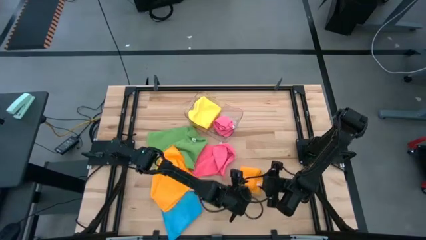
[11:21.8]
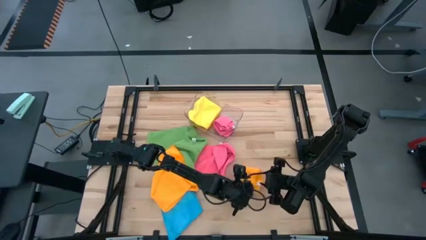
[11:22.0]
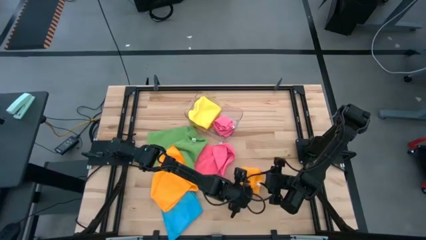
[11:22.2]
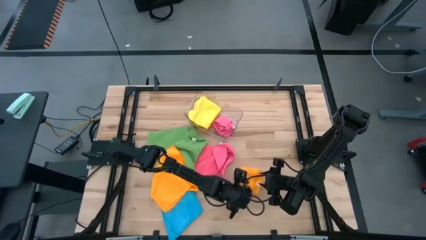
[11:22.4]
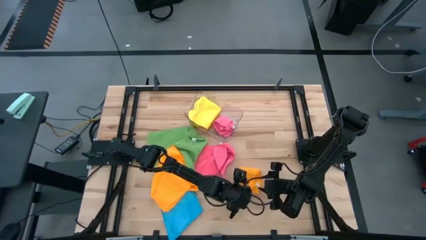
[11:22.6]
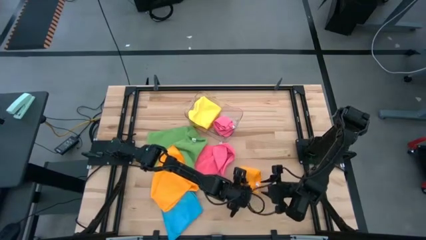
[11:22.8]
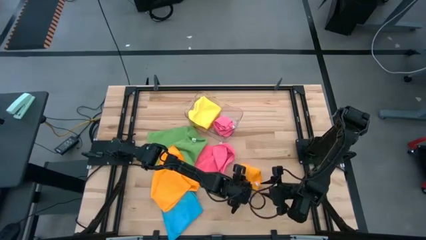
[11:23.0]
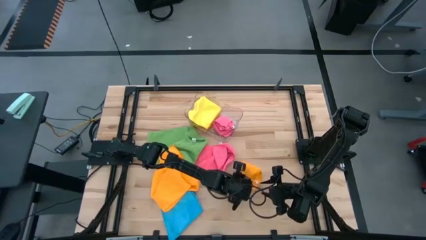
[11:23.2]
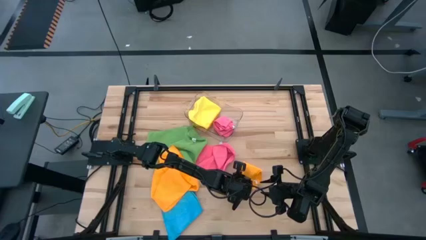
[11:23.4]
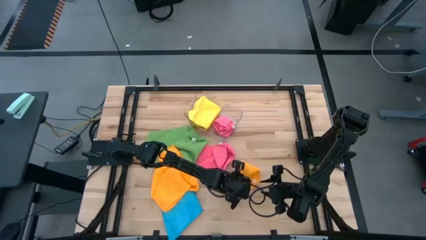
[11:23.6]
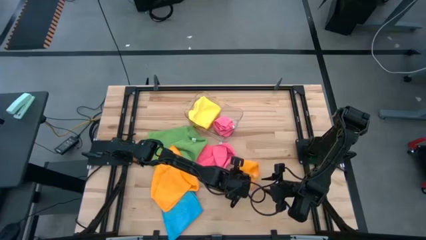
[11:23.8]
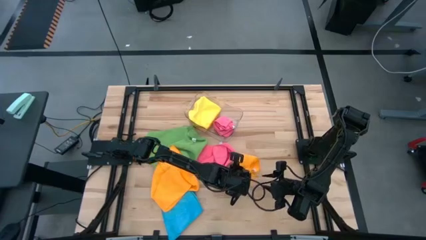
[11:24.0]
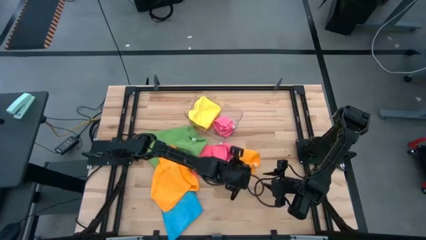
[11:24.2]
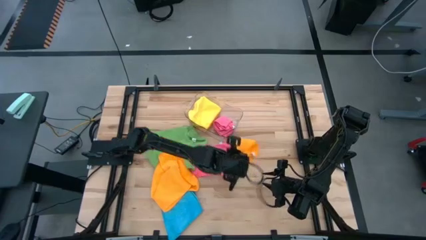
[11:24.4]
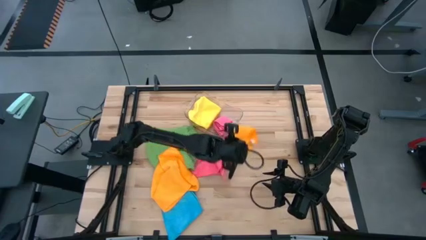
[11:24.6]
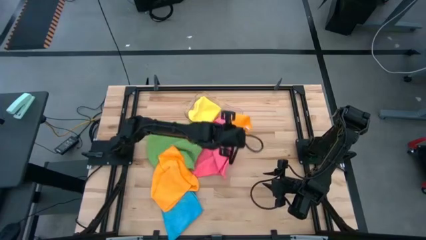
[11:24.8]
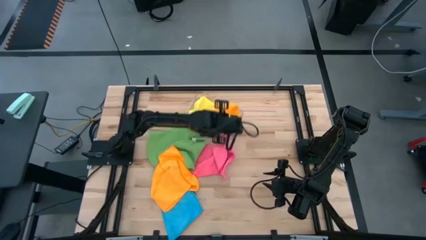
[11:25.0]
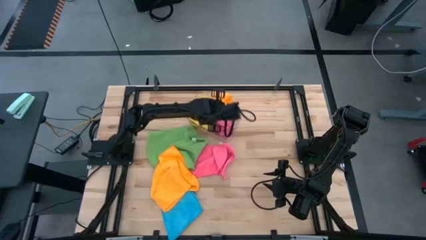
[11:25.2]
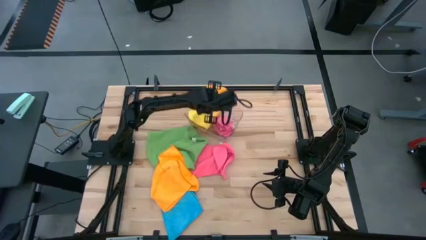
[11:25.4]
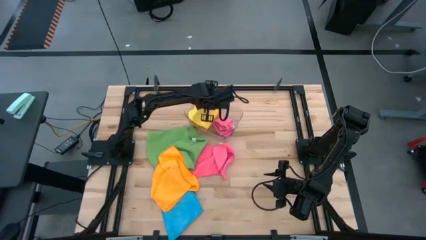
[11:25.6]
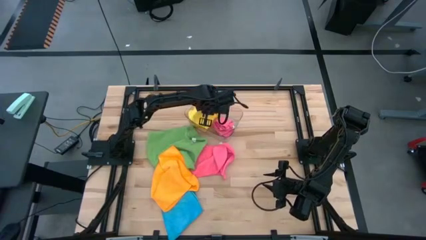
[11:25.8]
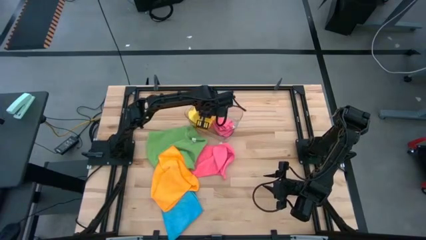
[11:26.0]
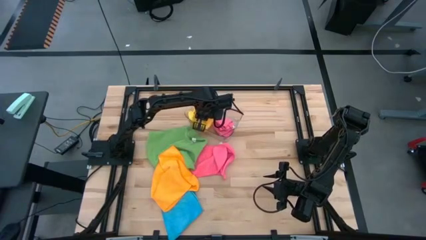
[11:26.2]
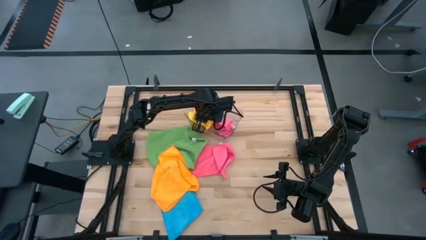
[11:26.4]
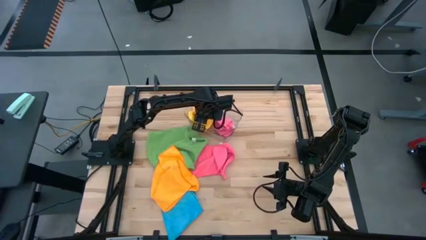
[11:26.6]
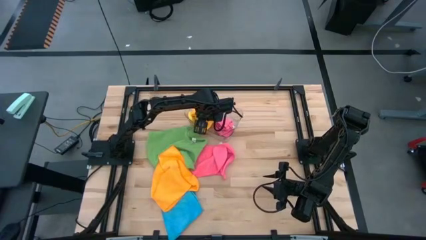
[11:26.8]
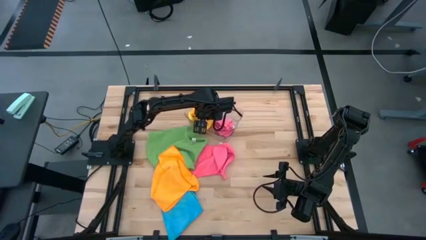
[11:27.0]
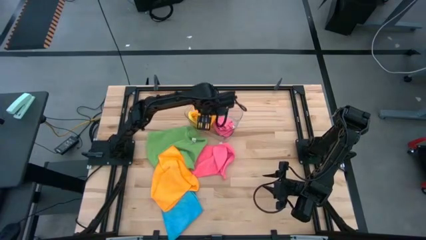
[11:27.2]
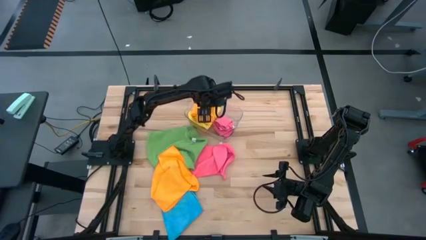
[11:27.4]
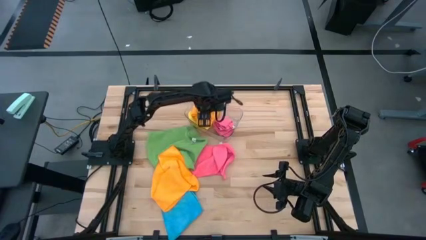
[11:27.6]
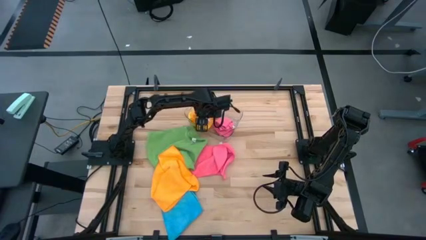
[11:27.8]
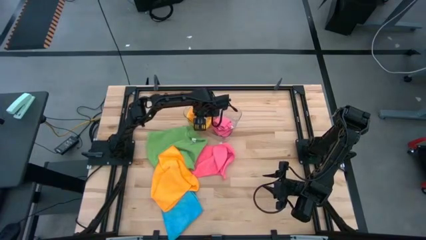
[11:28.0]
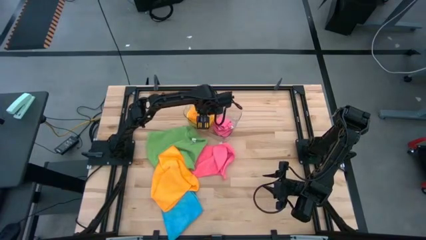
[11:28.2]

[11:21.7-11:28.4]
Task: Fold microfiber towels
Put the right orange towel into the transparent bin

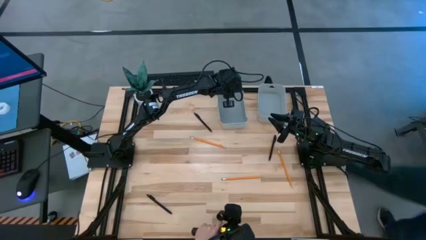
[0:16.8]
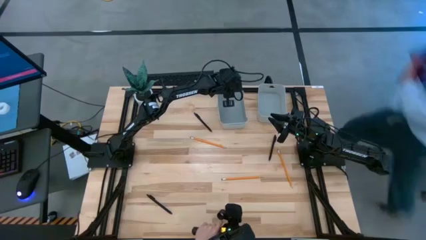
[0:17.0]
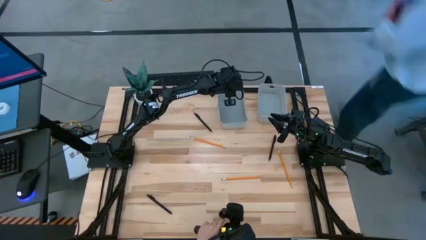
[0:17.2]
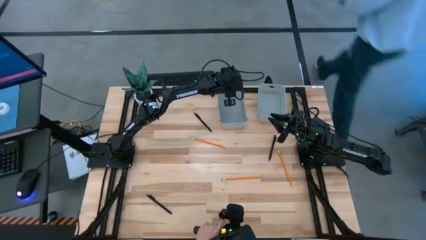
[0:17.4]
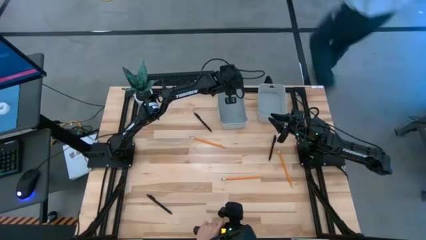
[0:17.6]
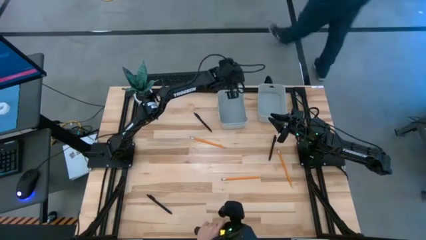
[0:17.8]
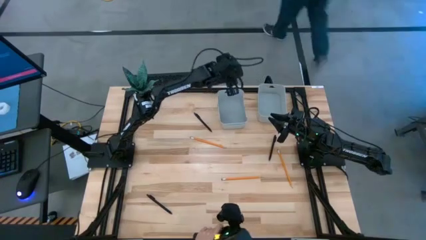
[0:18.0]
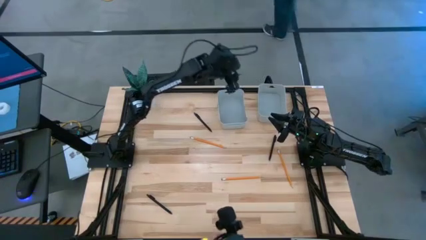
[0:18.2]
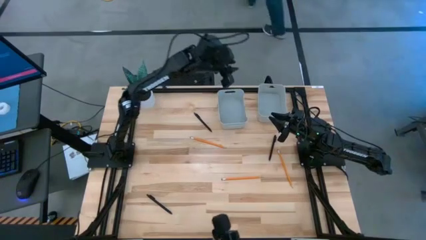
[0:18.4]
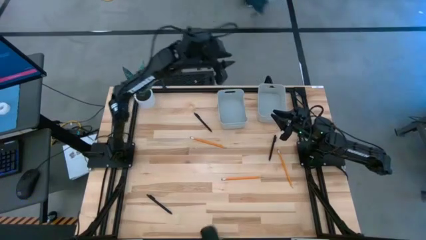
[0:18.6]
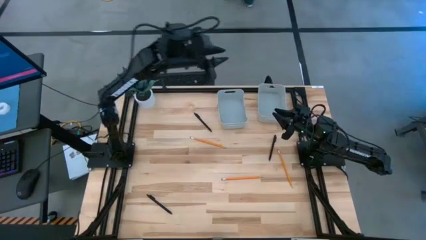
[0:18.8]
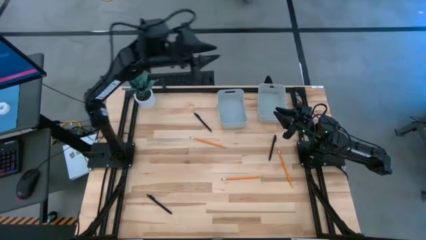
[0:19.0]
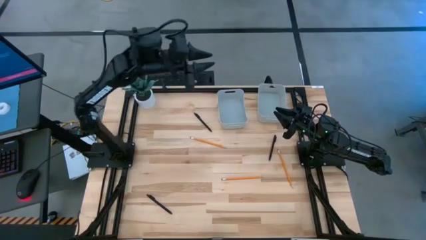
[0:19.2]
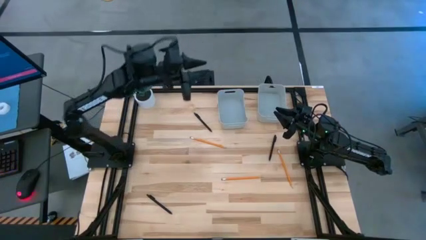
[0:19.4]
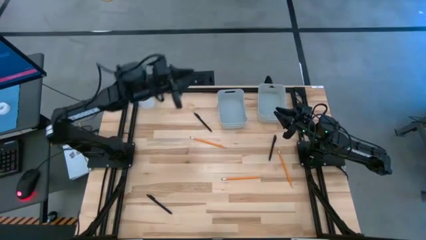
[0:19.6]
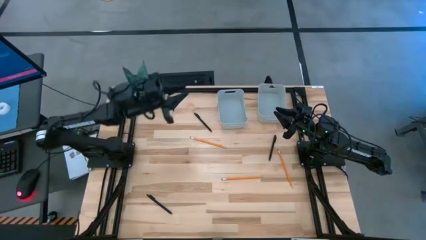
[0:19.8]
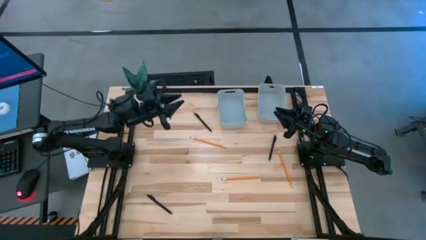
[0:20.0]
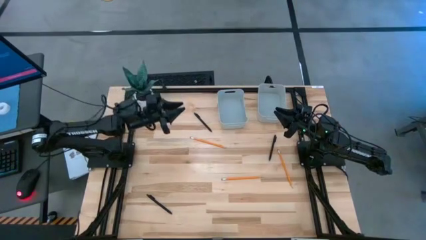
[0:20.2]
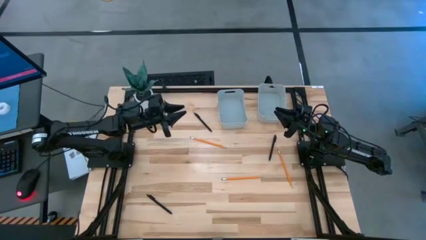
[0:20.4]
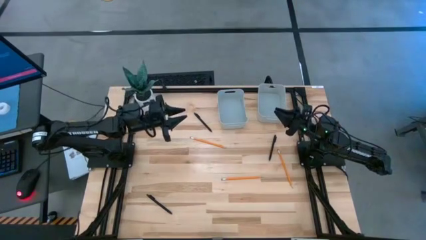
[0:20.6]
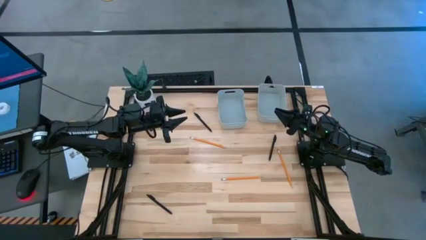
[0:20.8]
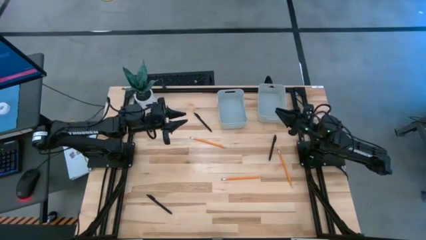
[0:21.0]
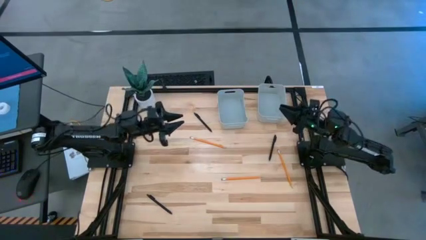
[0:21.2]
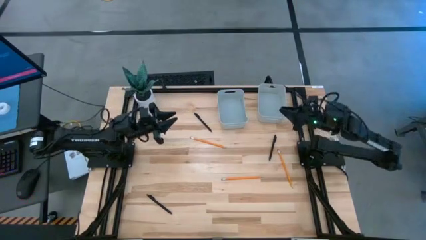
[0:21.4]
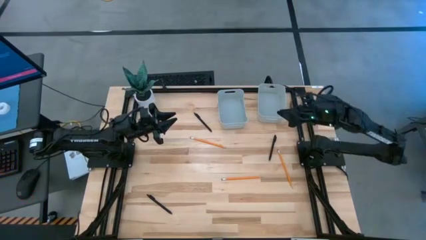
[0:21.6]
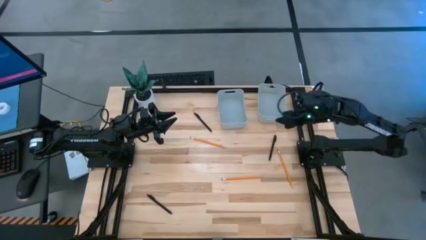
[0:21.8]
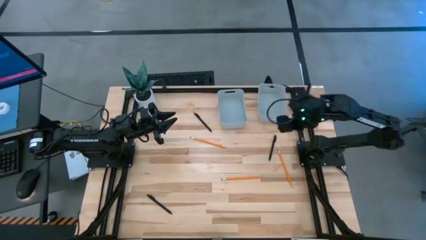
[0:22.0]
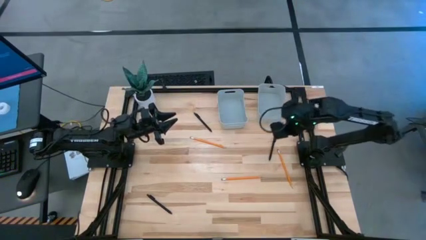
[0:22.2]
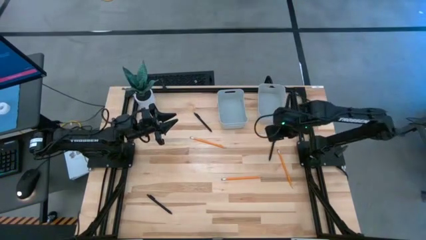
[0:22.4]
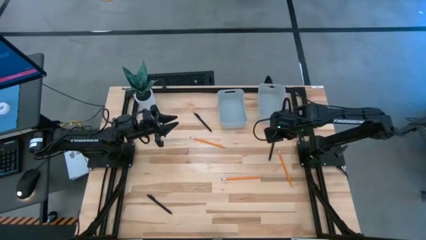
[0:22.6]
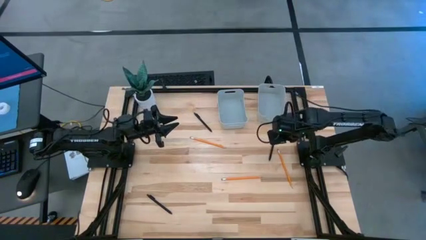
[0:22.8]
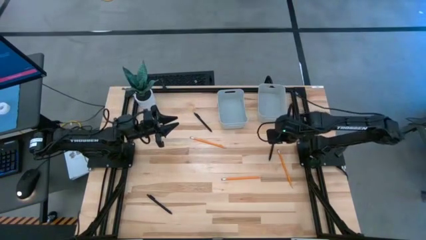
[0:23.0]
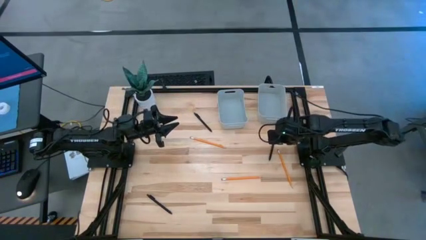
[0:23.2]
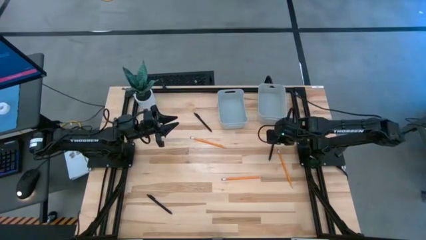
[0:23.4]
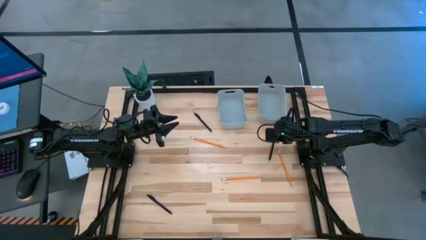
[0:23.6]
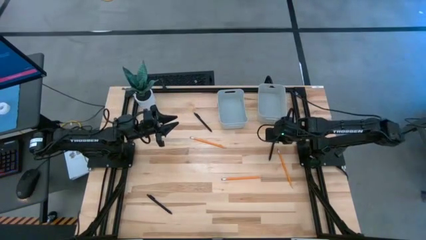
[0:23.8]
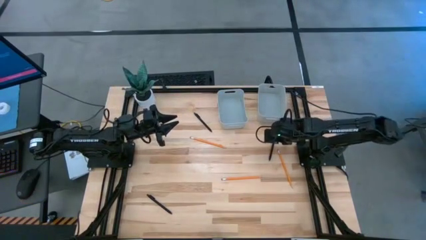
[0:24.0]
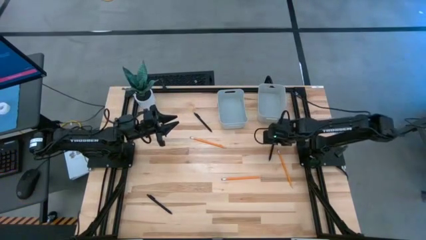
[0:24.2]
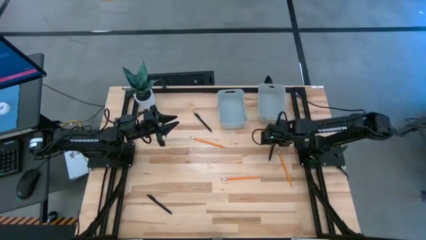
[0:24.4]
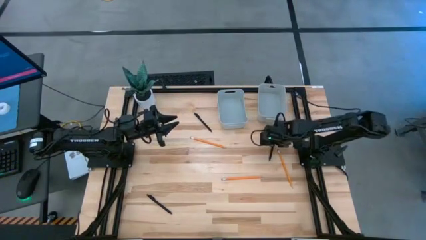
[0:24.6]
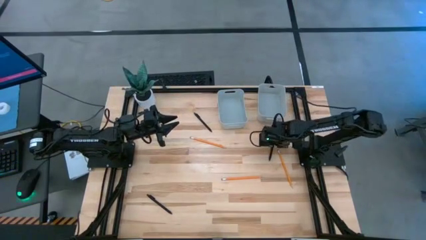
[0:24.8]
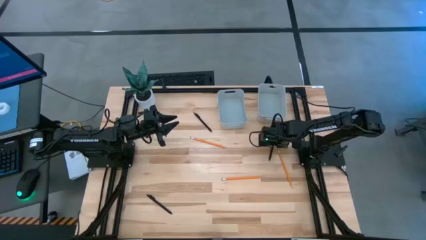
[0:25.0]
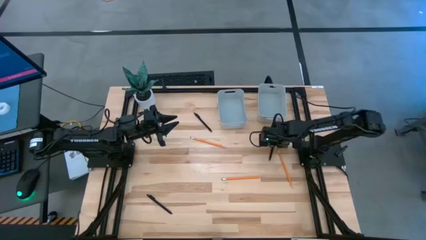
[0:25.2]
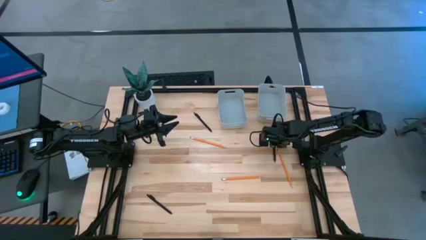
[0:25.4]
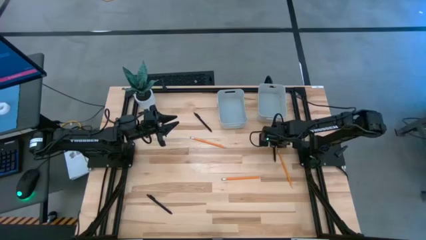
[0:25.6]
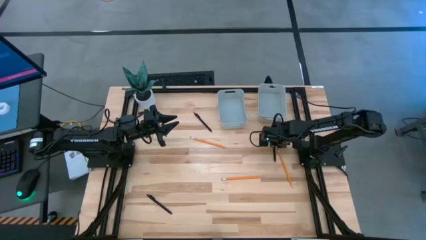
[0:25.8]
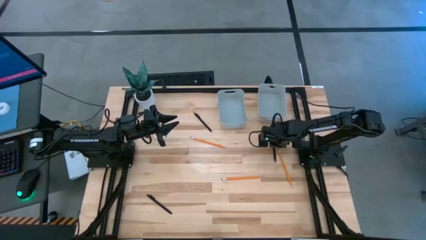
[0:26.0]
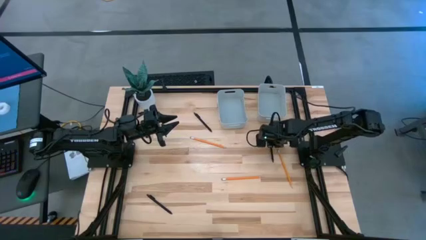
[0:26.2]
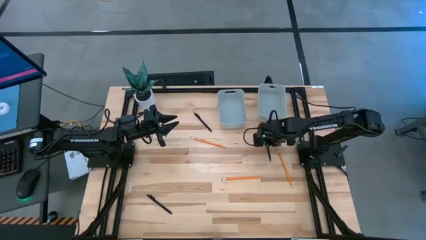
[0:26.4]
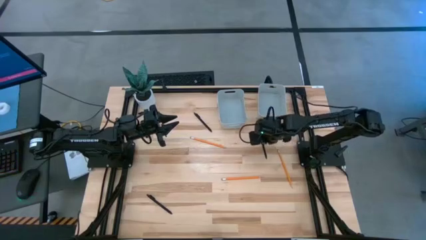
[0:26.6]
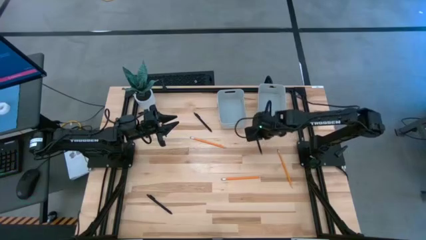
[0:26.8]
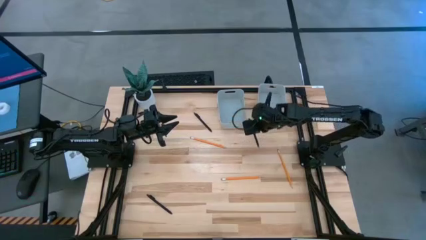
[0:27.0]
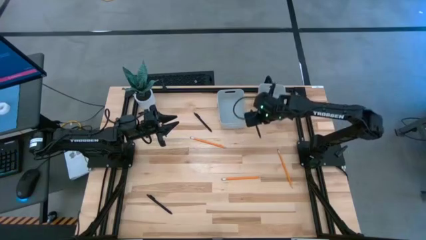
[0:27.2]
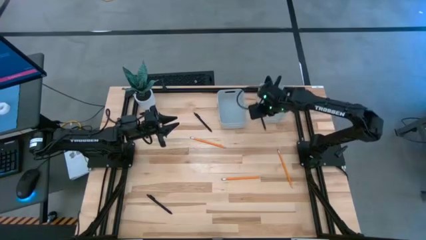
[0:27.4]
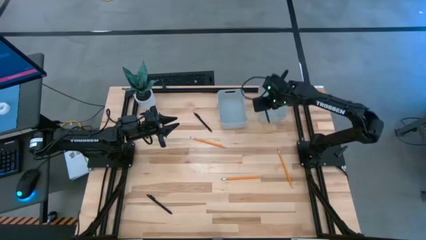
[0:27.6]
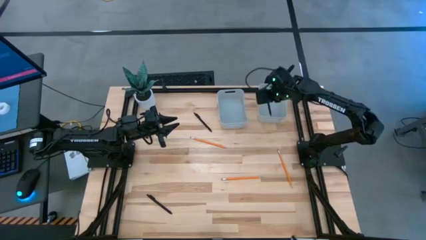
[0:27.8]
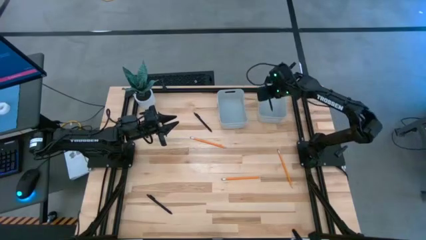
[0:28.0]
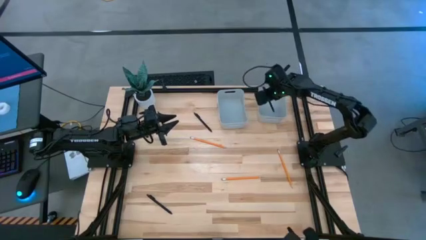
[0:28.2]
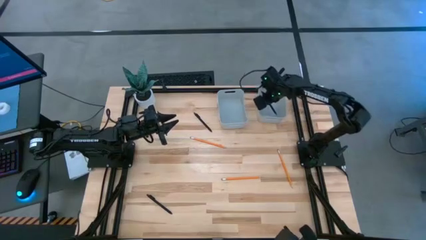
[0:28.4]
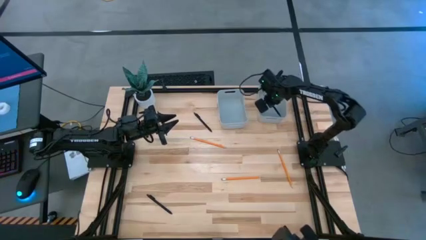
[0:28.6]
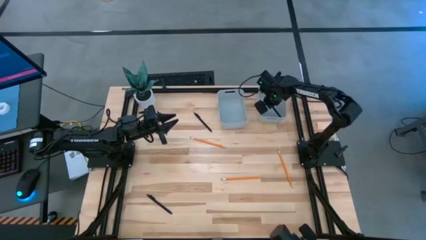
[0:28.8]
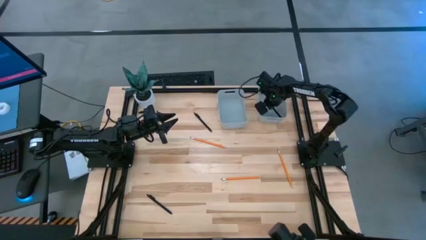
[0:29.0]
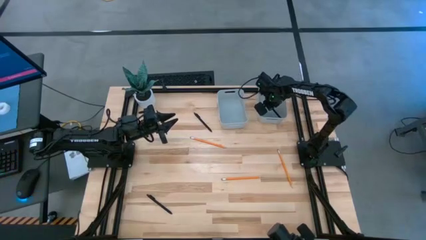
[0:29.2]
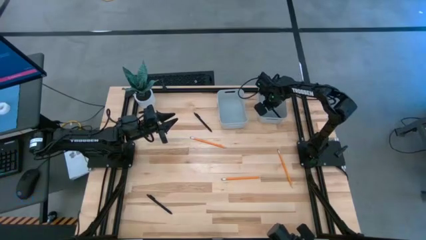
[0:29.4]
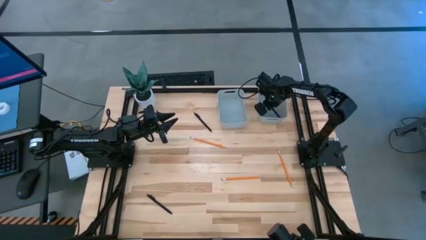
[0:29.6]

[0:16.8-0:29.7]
Task: Sort pens & pencils
Put the top right black pen into the right gray bin
